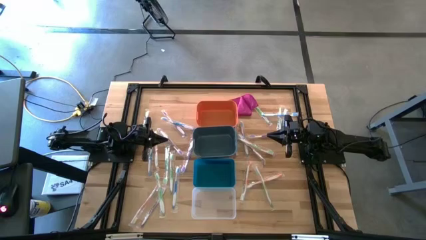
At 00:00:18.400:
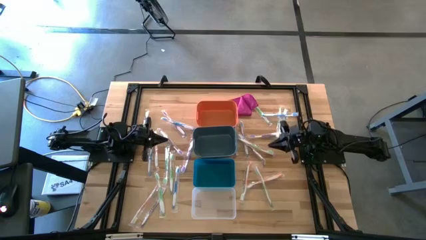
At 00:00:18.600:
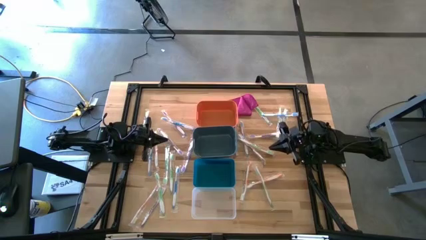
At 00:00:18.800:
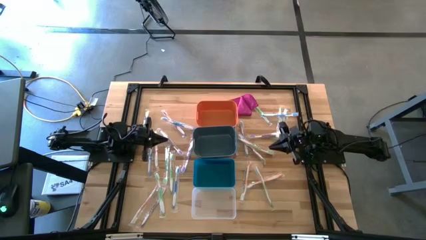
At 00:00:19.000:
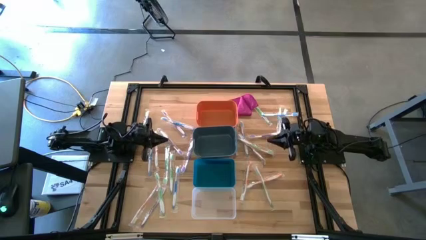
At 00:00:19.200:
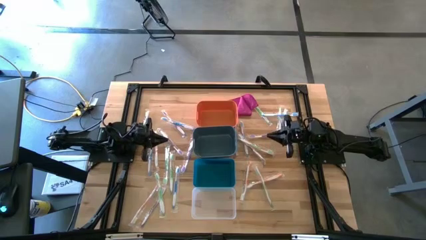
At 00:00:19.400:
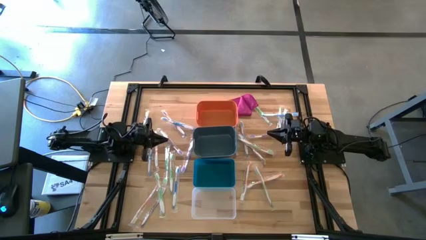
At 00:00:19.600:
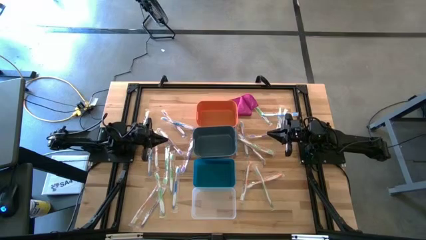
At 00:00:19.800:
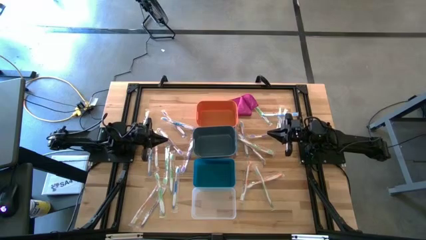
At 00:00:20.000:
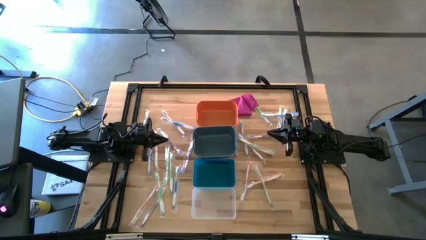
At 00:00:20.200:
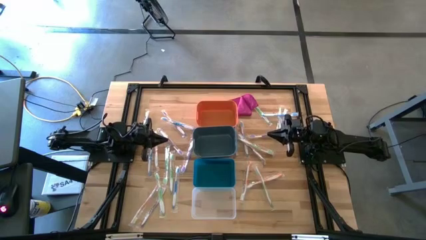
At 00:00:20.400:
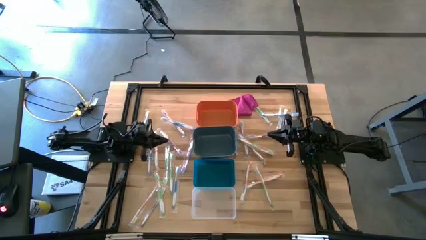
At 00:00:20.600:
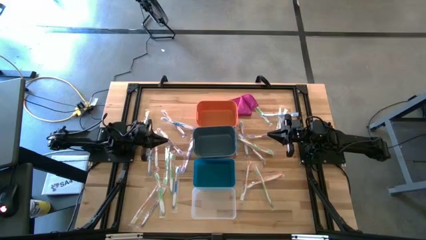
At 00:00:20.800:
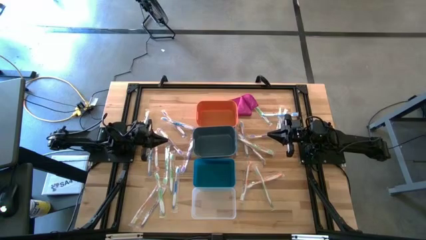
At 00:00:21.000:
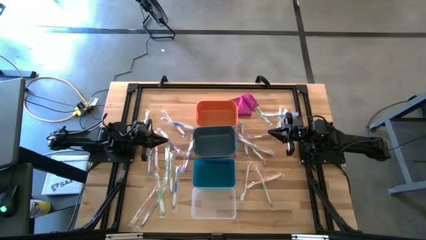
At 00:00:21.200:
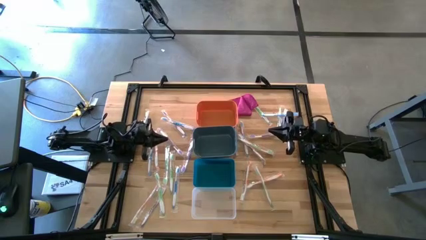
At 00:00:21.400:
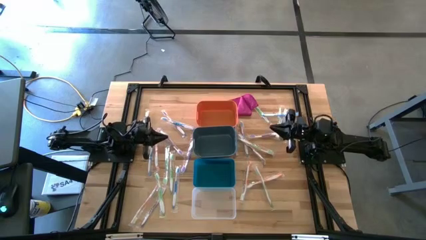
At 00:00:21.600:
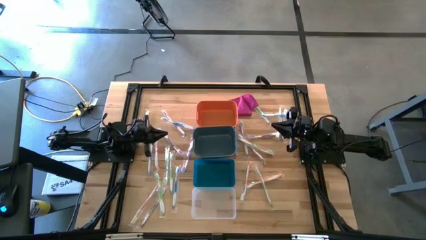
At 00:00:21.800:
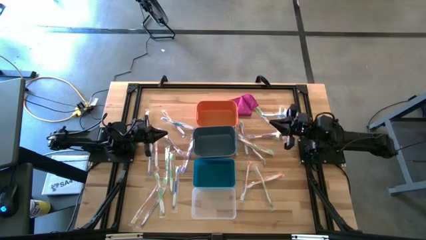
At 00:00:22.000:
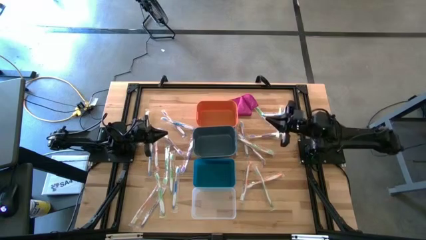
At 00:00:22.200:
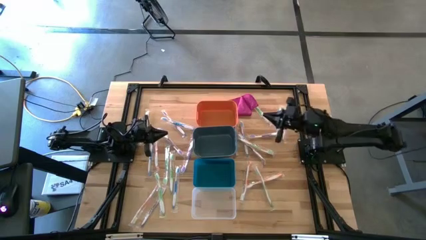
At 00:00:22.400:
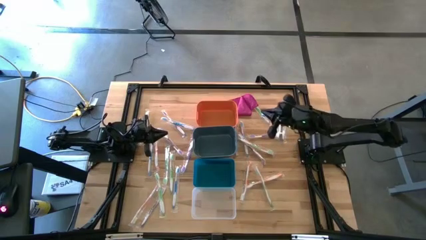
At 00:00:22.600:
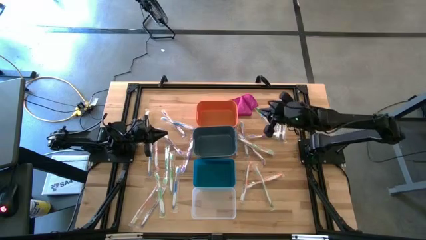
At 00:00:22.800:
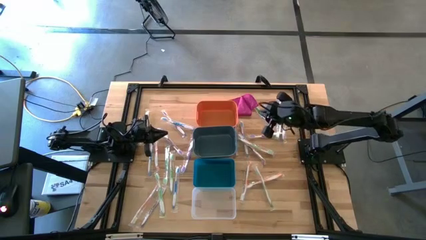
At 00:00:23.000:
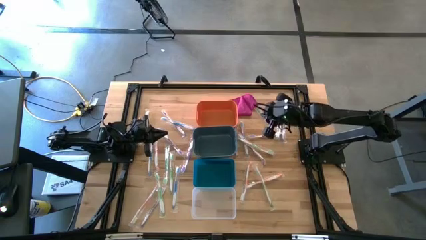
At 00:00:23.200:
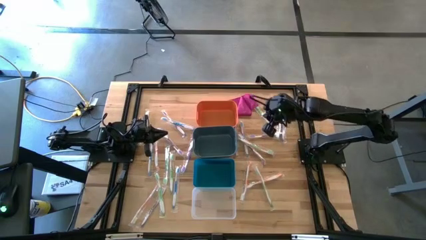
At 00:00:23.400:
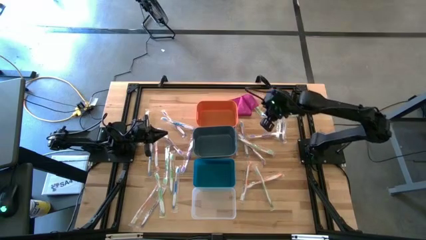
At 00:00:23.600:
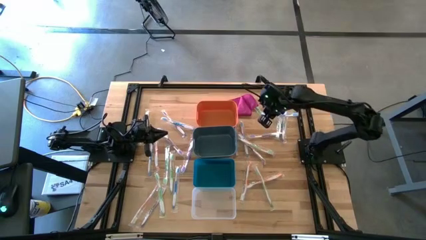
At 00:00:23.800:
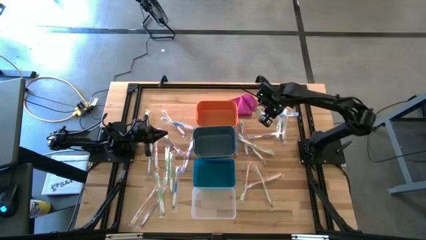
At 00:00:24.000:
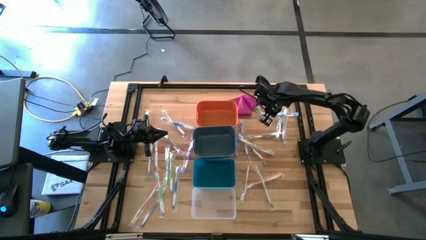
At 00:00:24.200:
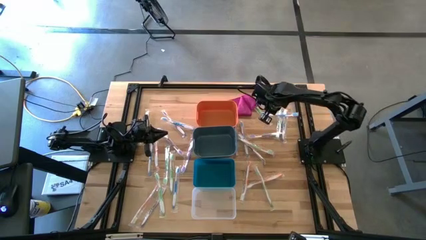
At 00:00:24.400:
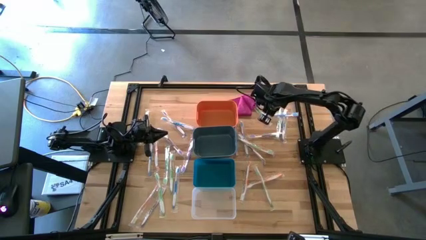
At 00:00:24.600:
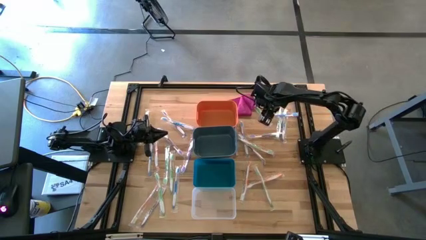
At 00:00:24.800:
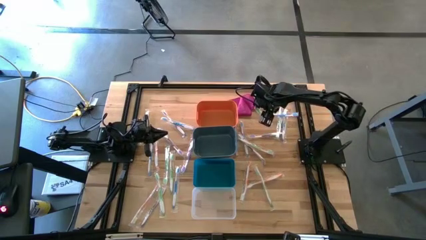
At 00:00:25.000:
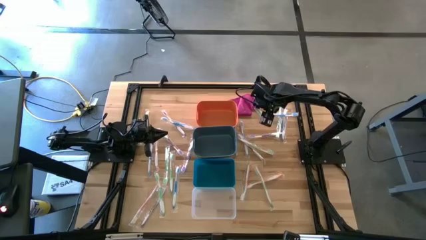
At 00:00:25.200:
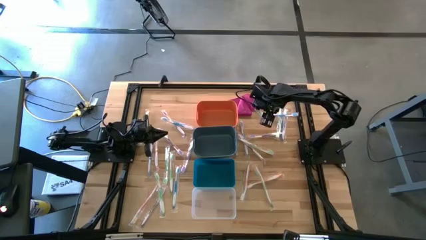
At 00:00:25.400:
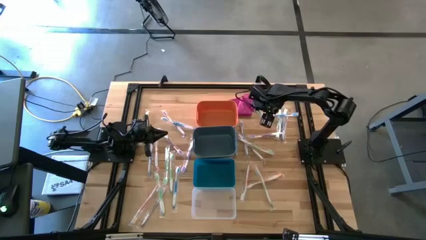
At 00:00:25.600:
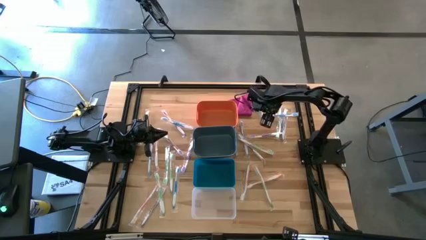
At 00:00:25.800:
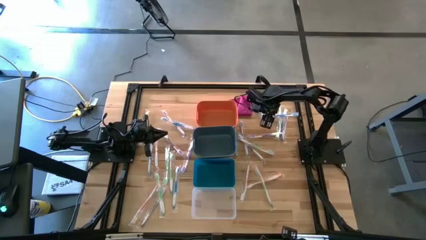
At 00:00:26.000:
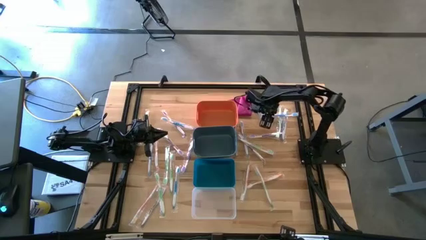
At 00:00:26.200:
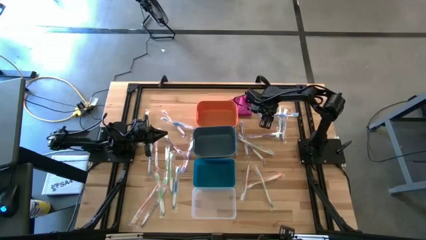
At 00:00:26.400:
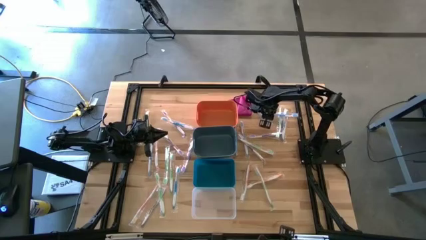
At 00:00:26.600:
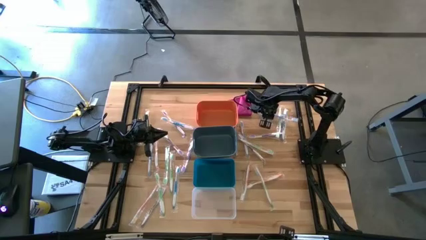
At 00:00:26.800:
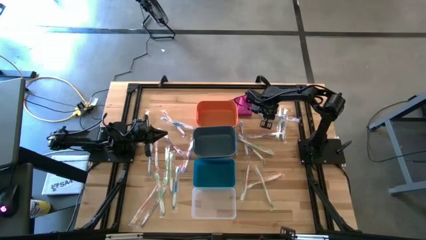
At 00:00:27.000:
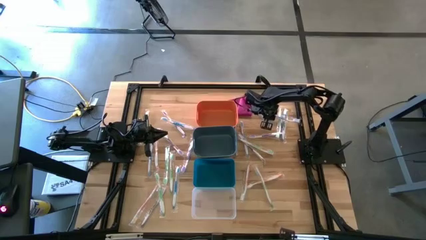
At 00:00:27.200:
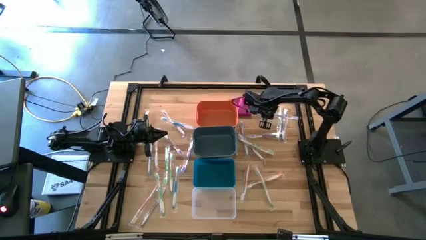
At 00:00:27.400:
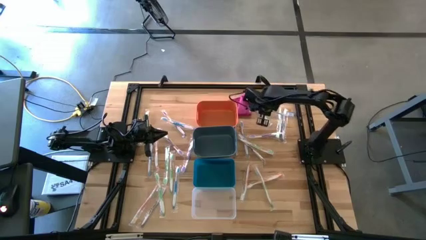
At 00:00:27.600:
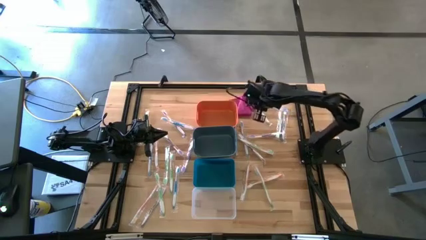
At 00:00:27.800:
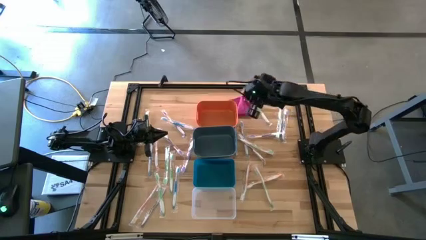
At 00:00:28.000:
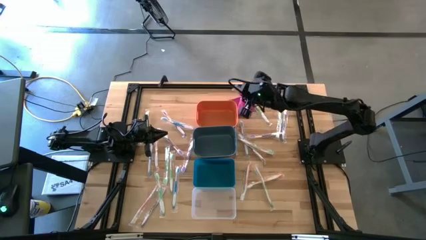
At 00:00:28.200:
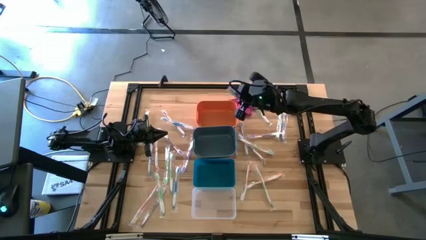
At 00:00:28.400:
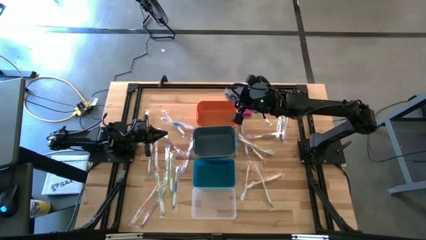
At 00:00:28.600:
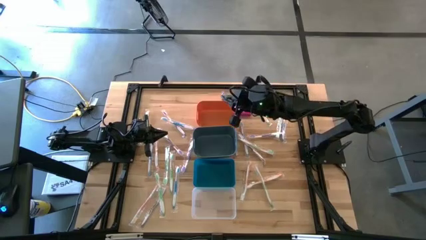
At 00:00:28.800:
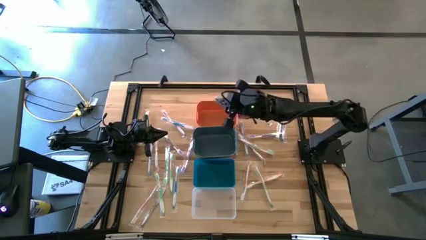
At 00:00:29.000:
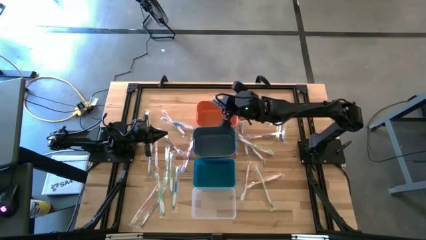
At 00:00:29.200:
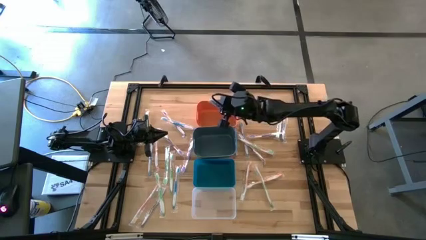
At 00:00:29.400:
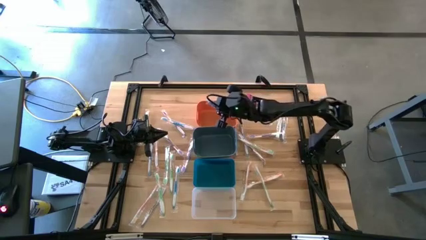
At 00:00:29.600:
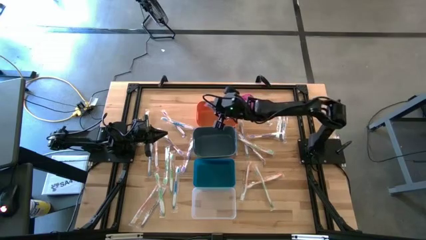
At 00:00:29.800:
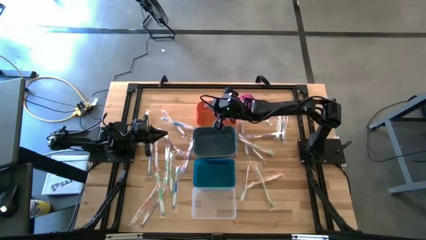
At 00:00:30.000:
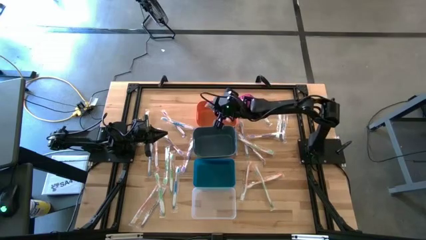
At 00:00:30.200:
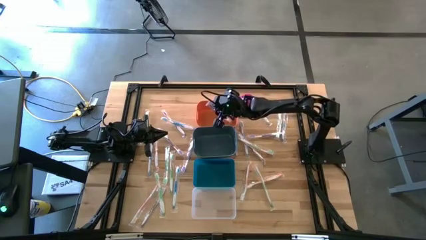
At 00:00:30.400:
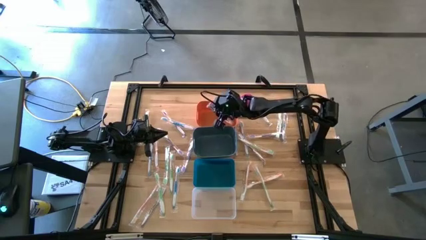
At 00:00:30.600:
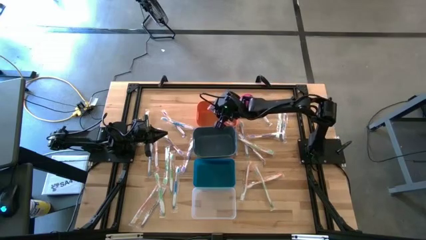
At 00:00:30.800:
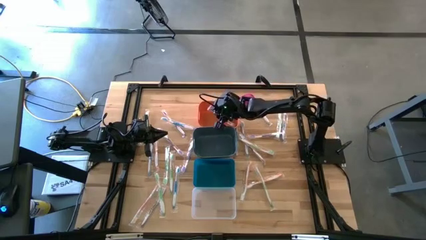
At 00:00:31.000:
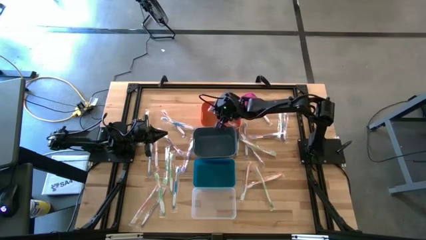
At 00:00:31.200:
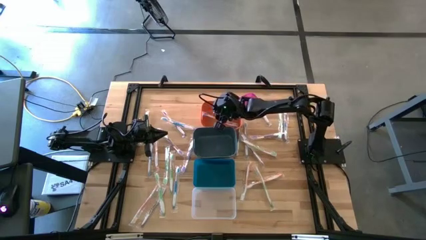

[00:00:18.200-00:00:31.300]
Task: Pick & Place Toothbrushes
Put the blue toothbrush into the orange bin

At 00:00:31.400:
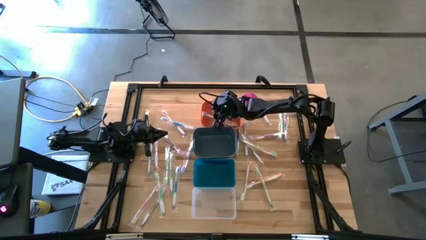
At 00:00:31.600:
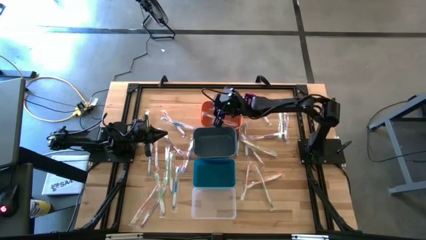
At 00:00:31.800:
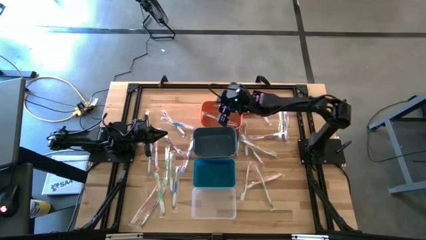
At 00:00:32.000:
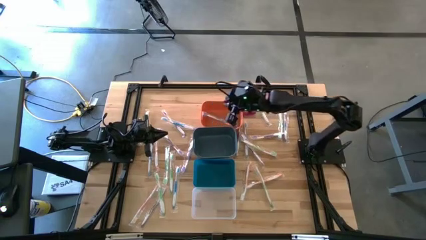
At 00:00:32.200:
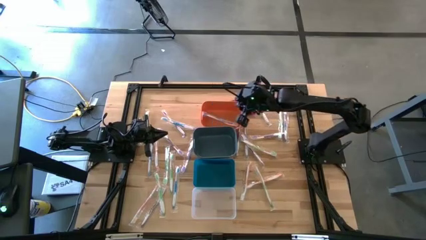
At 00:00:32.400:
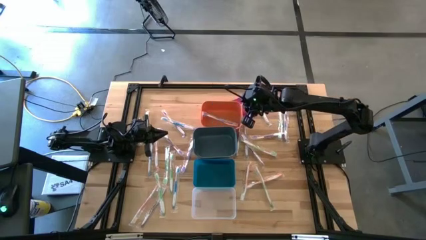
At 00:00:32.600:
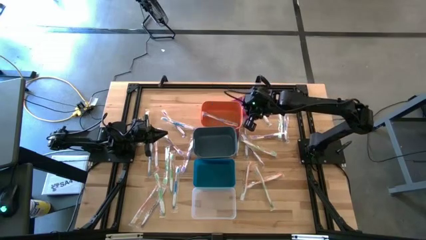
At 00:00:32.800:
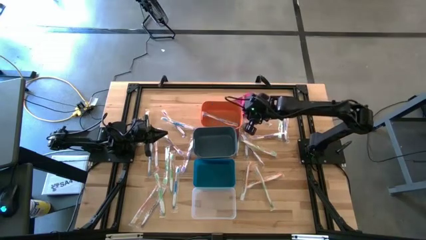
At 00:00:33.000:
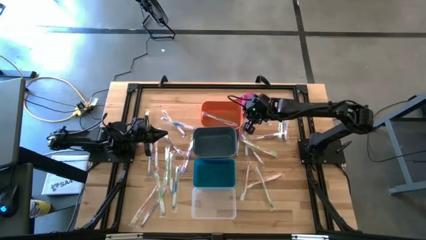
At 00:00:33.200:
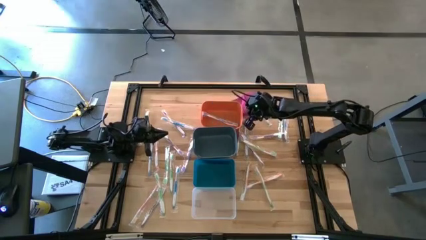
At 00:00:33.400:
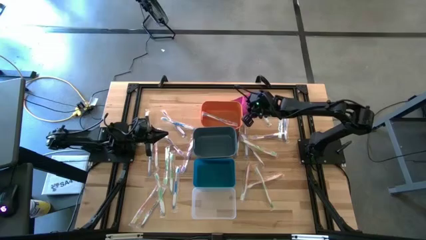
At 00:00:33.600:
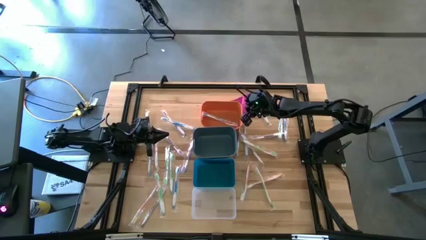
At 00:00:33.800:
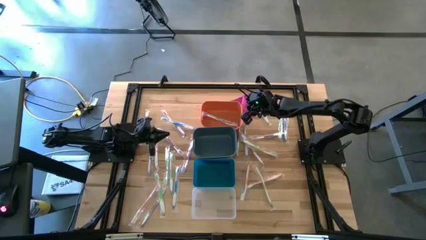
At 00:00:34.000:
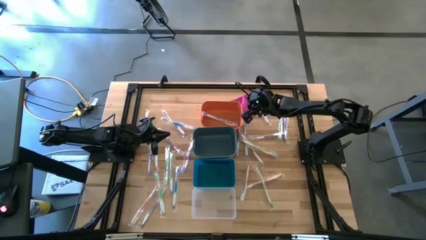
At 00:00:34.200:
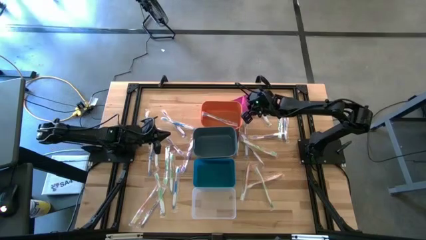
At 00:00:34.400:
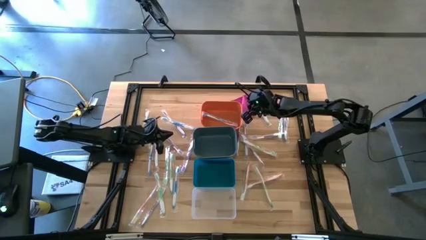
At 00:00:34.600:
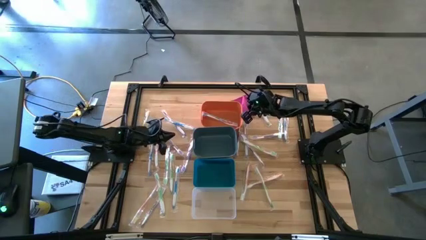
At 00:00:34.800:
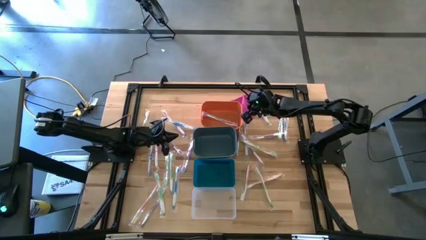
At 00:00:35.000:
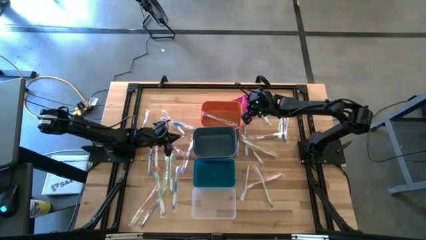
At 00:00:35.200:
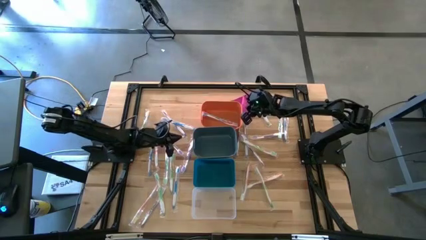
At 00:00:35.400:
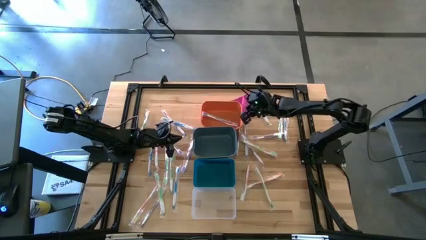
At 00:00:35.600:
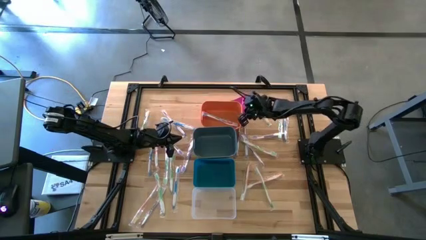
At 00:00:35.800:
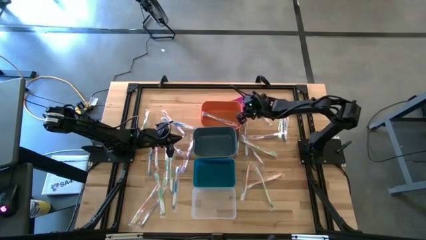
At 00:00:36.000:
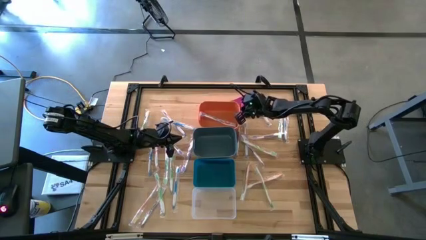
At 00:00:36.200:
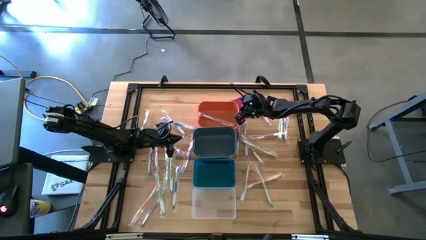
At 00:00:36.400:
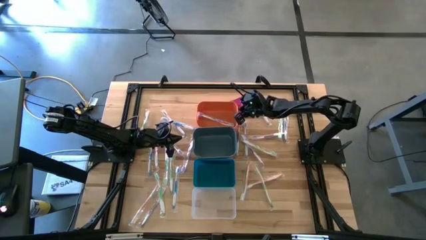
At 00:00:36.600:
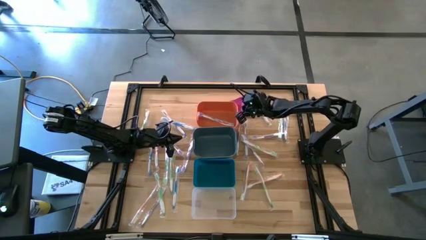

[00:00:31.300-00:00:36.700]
Adjust the orange bin
